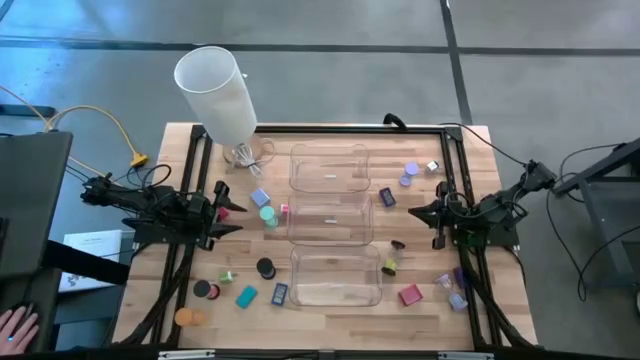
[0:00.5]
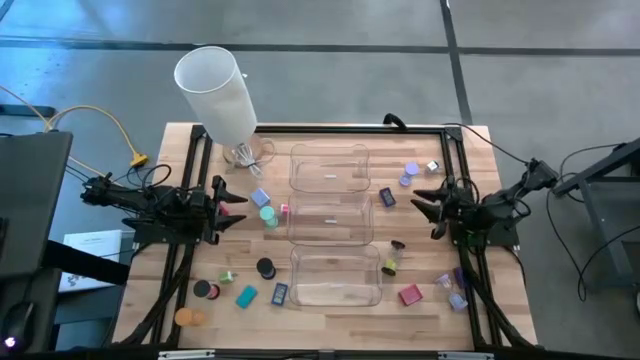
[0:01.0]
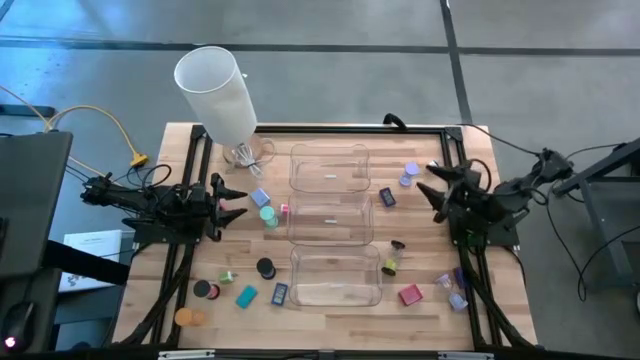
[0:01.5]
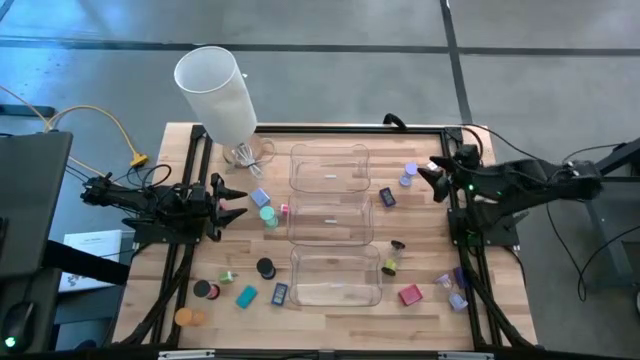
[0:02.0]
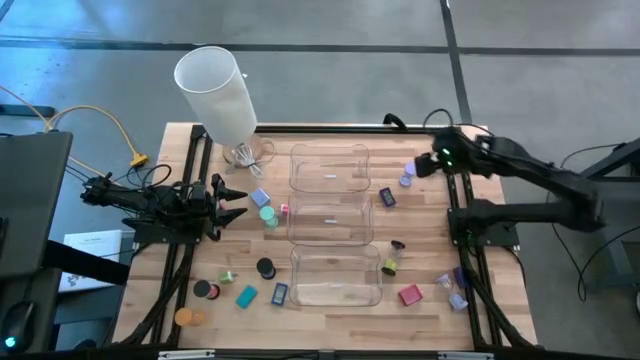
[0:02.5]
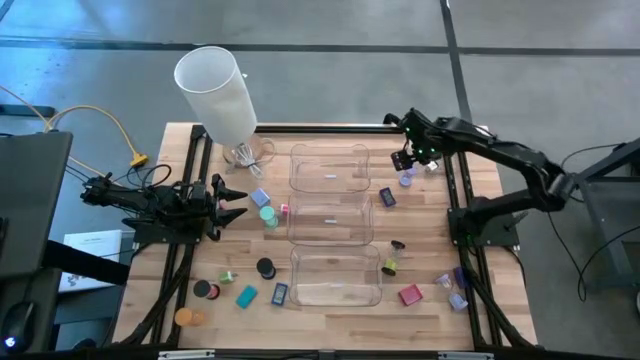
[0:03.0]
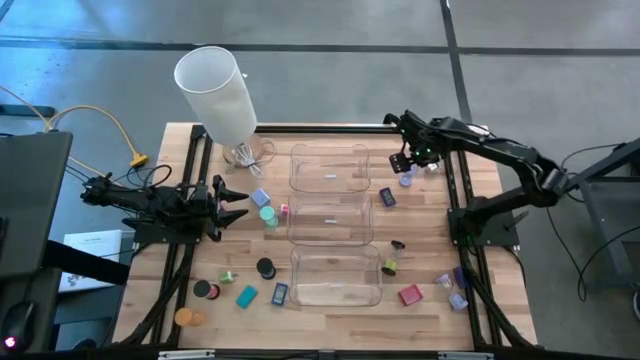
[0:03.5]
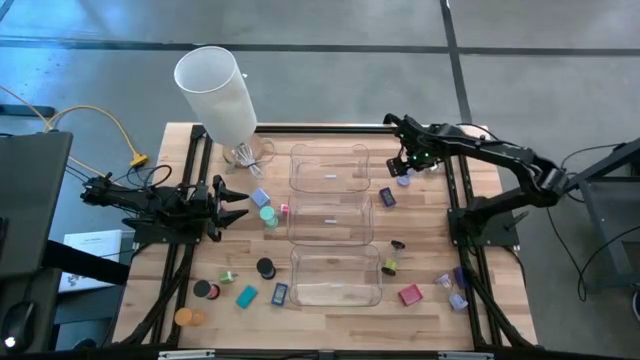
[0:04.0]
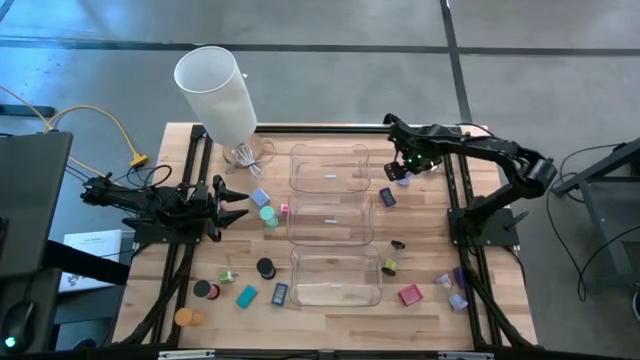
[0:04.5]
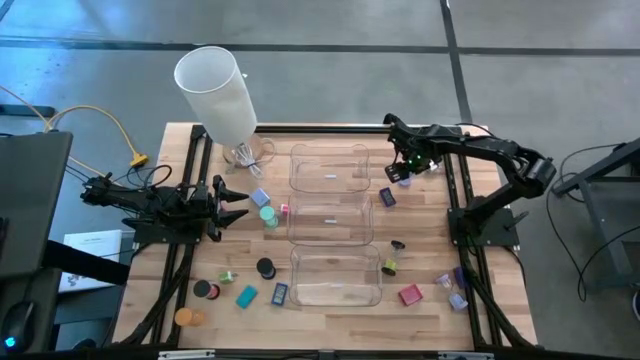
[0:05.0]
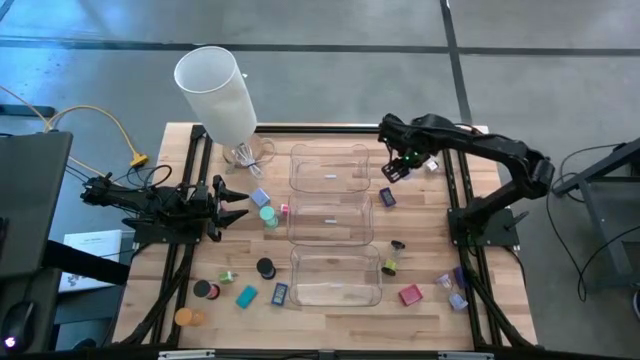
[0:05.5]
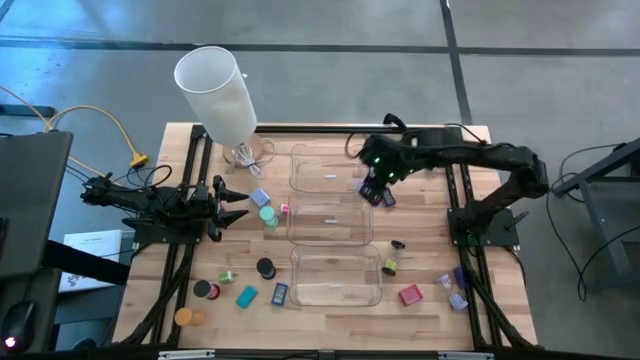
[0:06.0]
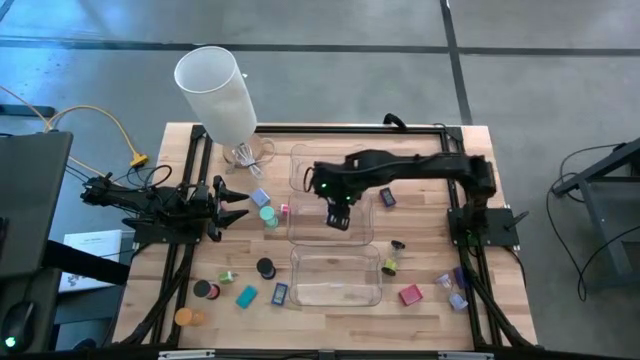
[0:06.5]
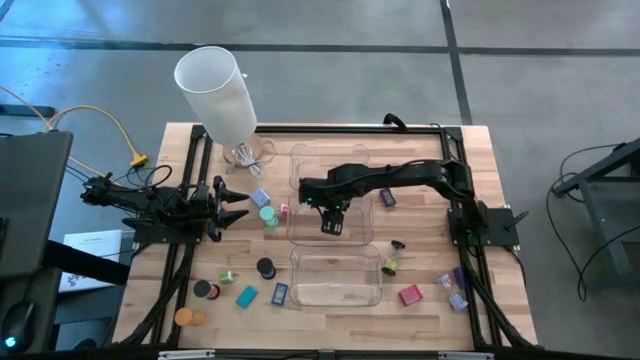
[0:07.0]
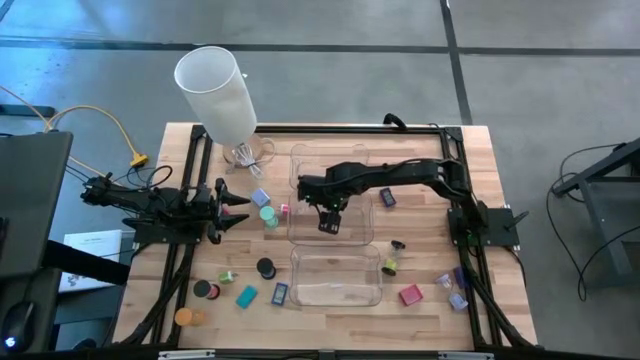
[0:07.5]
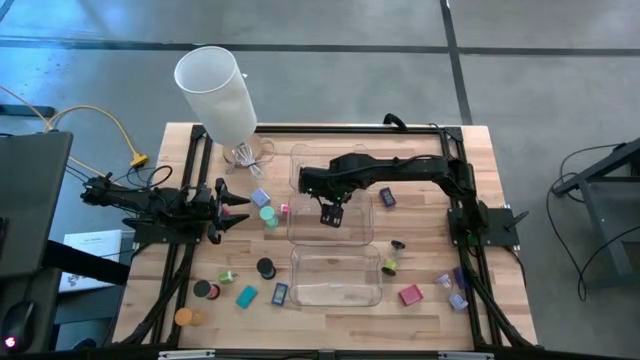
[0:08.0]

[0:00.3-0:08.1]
Task: Pick & Place Office items
Put the top right purple hourglass into the middle transparent bin

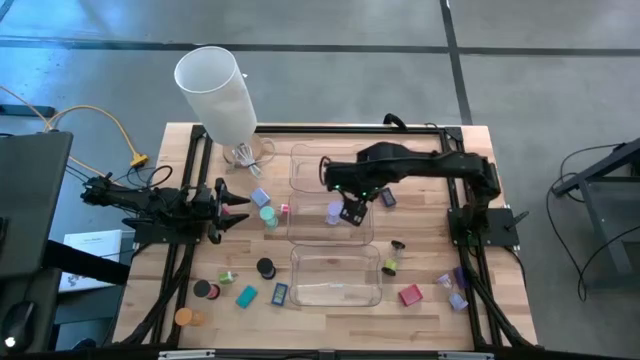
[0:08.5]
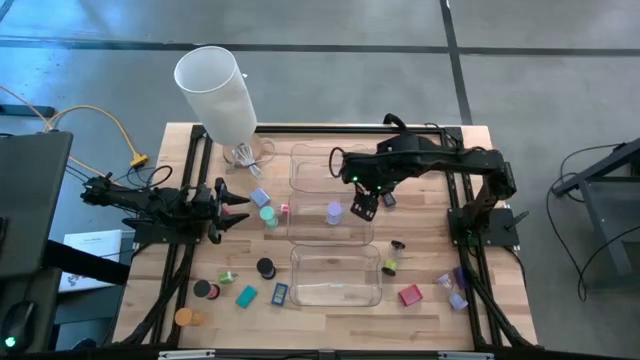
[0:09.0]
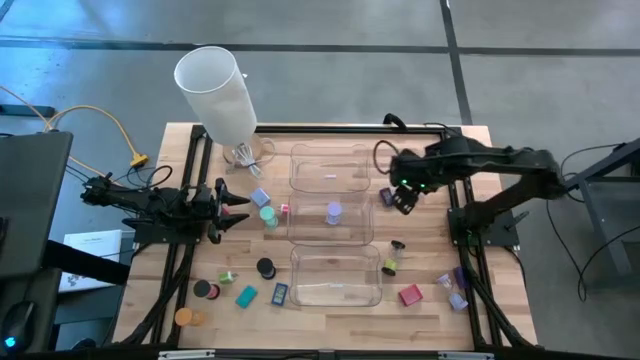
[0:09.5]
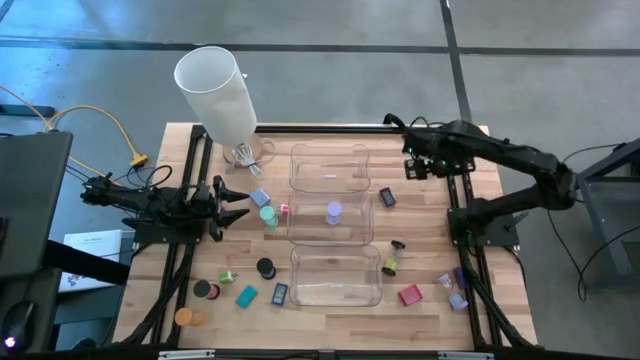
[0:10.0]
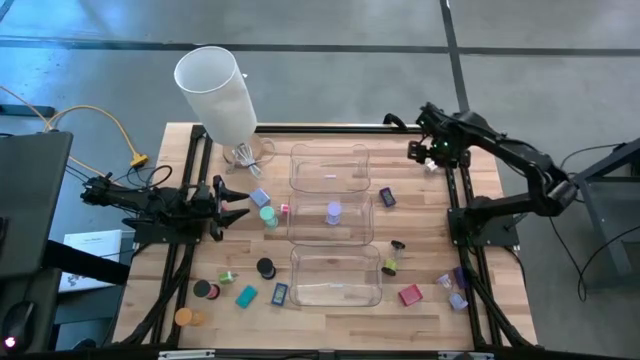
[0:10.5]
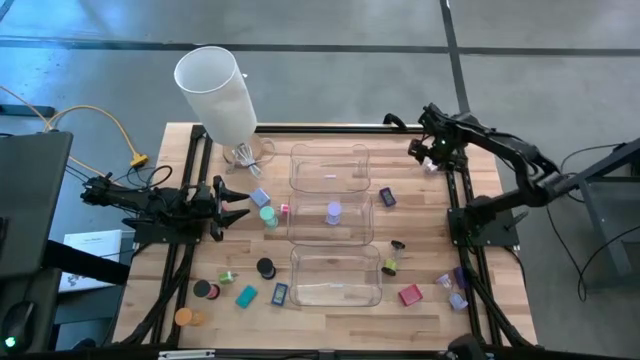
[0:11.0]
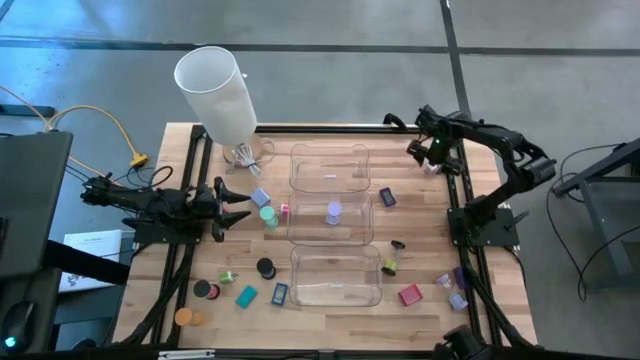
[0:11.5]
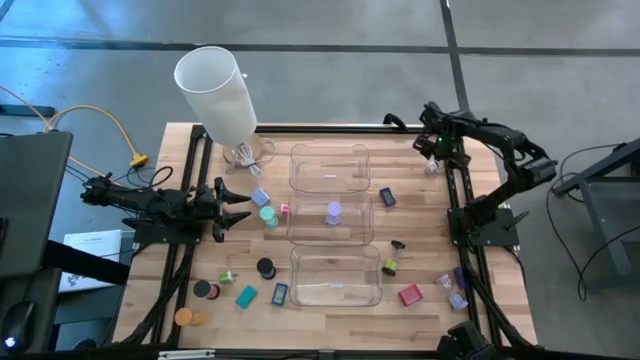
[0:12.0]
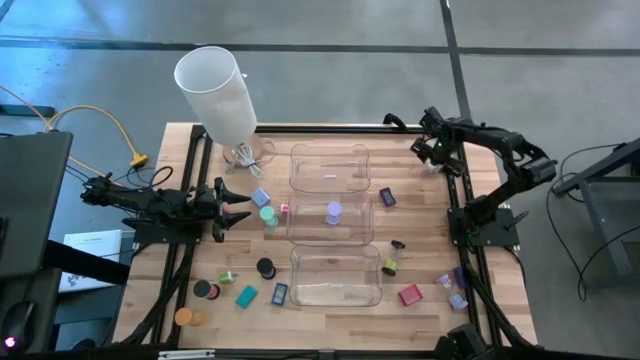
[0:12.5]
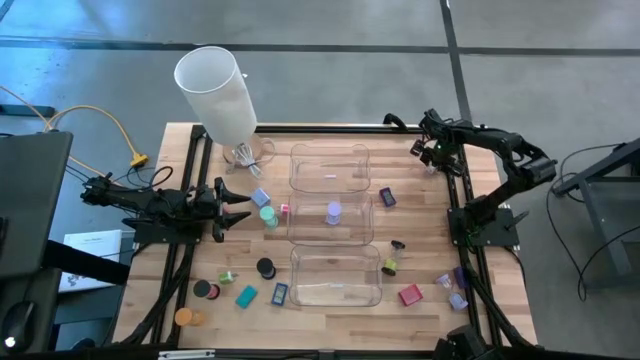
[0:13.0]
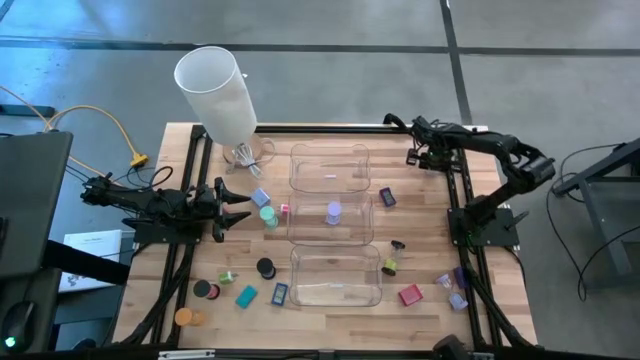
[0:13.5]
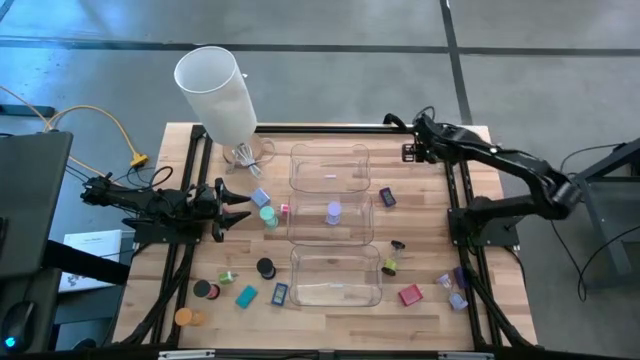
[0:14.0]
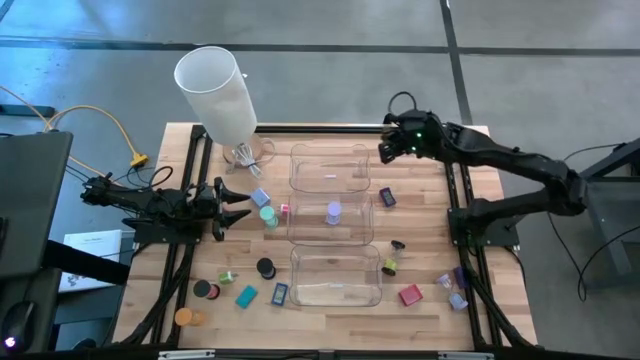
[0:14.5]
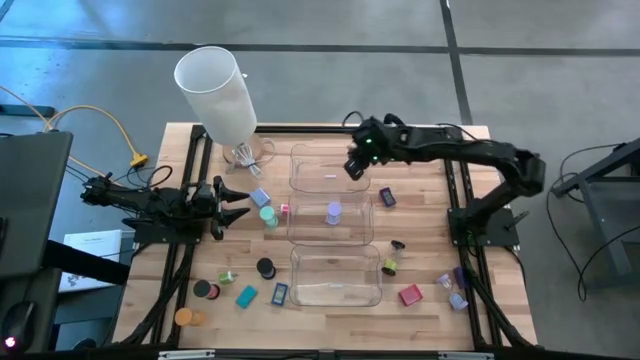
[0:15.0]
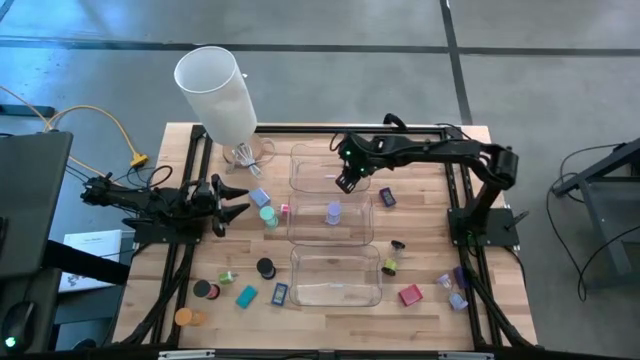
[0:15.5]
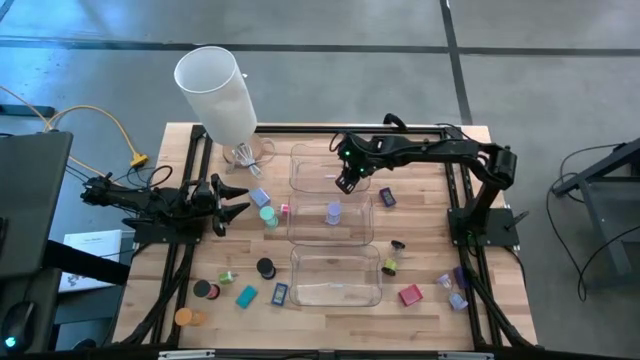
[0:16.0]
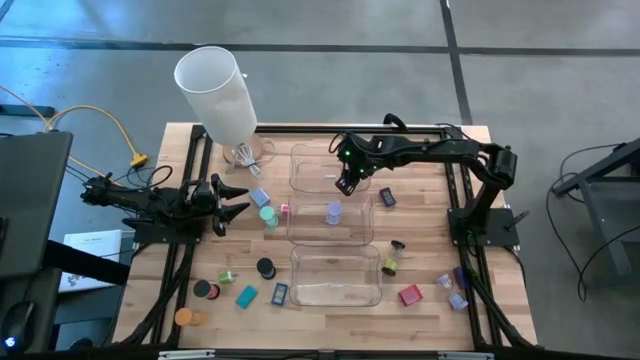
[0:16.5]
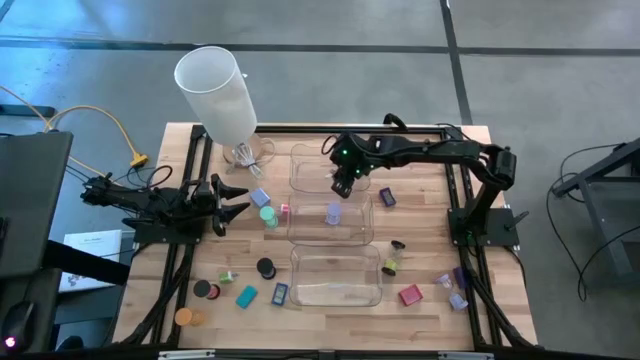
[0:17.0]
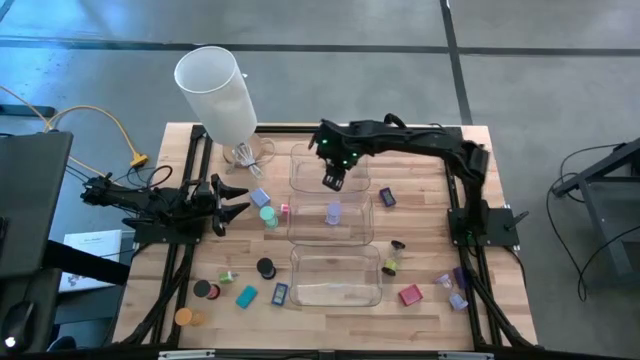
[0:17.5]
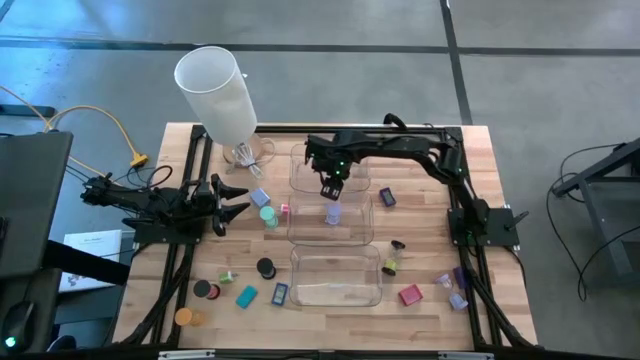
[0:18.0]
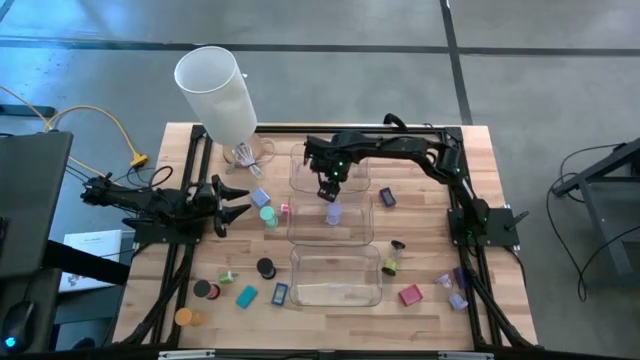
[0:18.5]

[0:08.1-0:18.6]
Put the white charger adapter into the top transparent bin

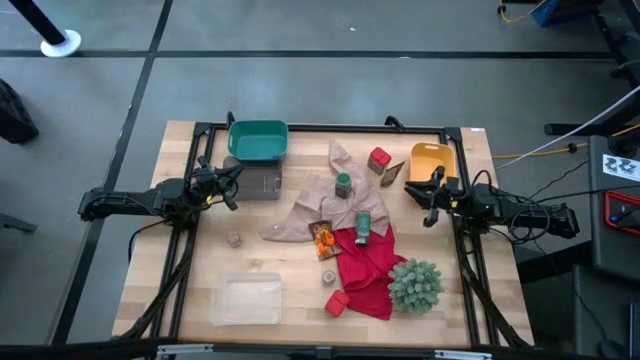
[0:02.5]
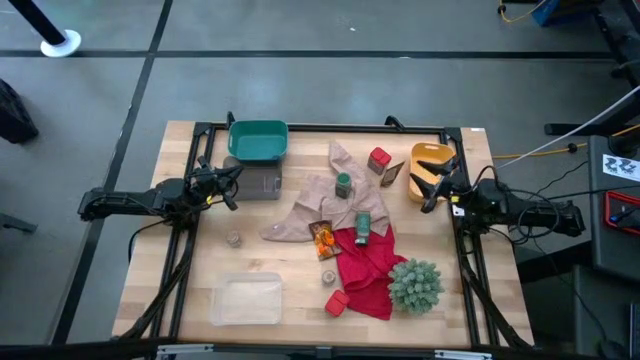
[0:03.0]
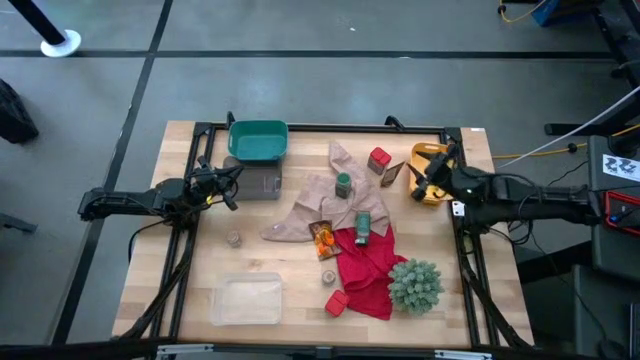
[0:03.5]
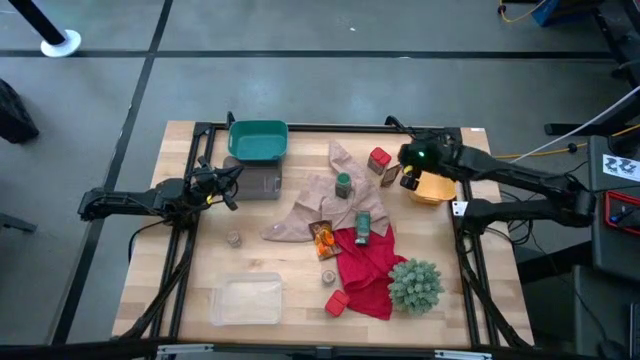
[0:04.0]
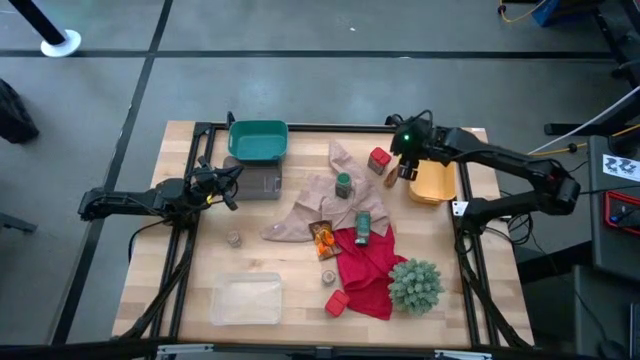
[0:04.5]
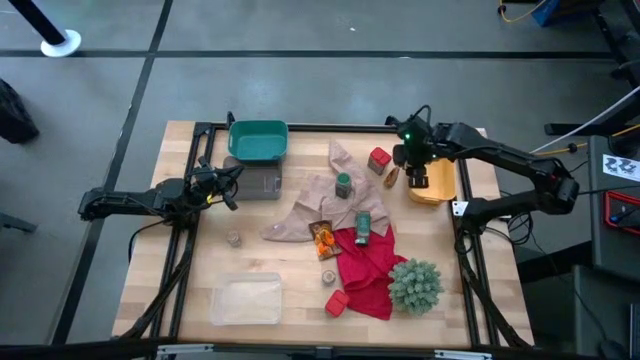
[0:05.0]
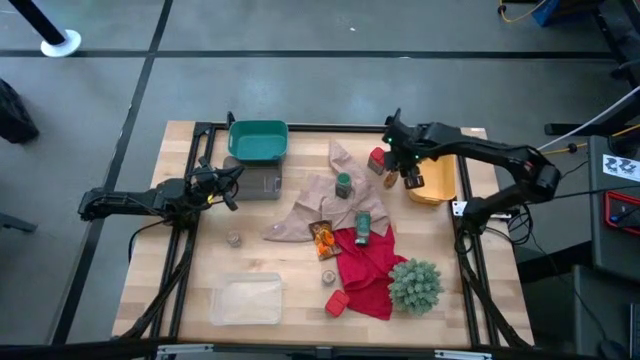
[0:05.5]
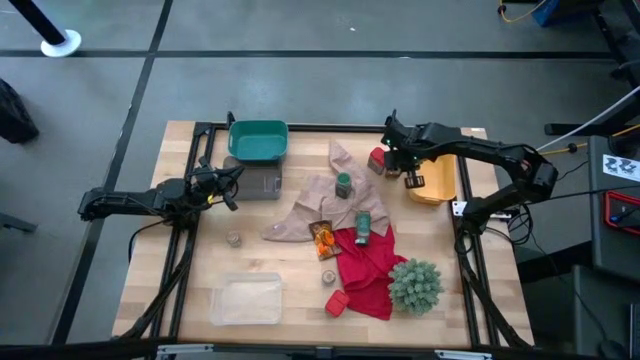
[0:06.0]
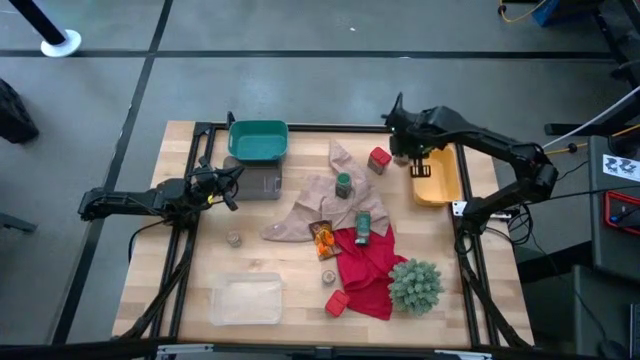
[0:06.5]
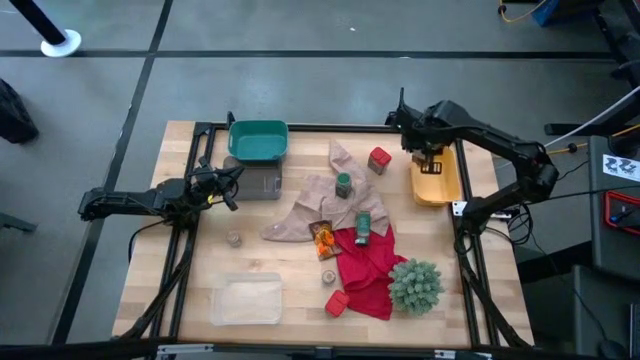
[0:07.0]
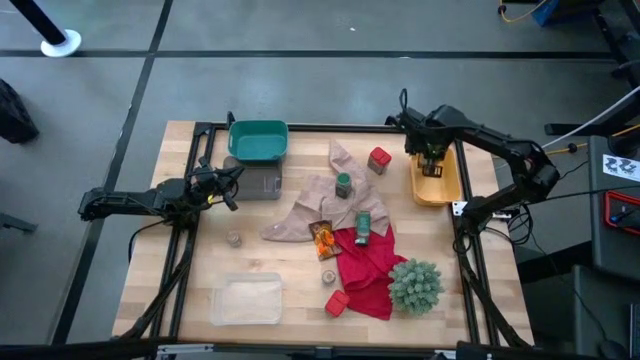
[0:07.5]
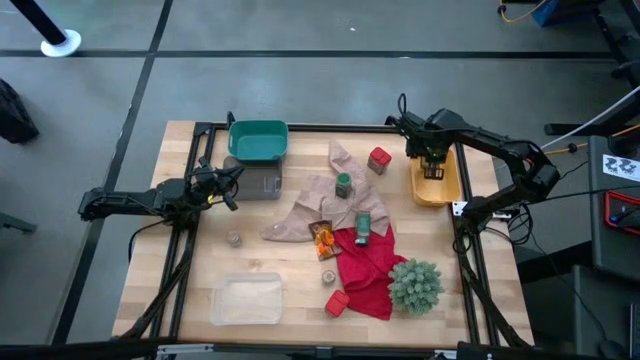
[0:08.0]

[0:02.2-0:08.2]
Task: Sort spices by type
Put the top orange seasoning bag into the yellow bin
